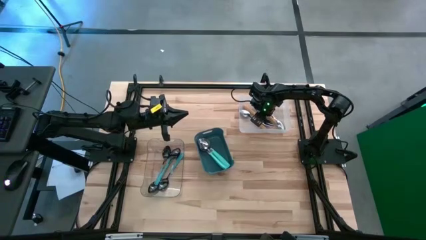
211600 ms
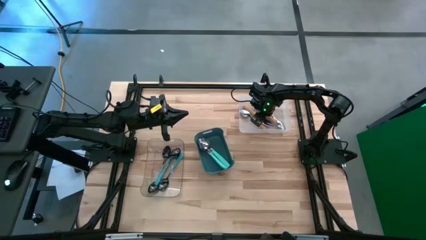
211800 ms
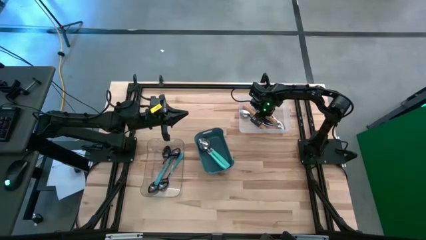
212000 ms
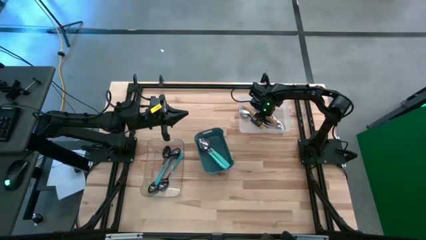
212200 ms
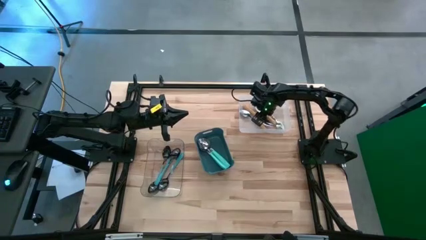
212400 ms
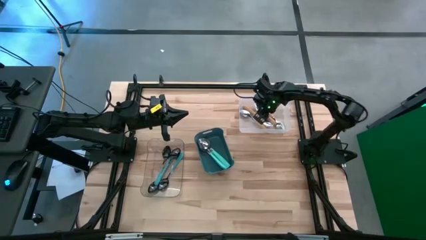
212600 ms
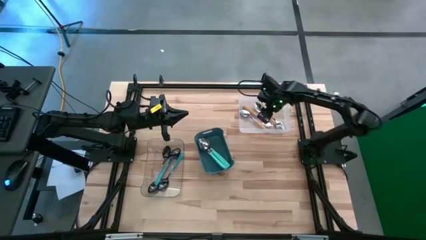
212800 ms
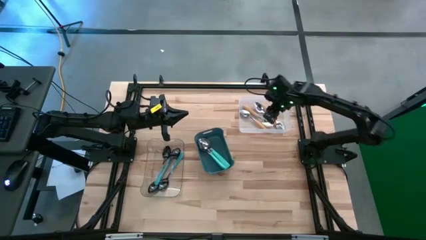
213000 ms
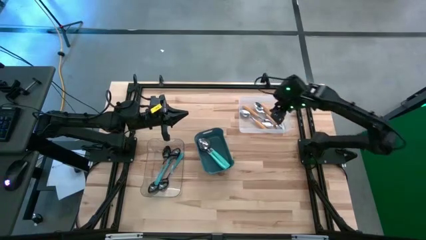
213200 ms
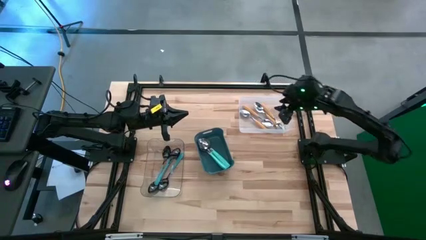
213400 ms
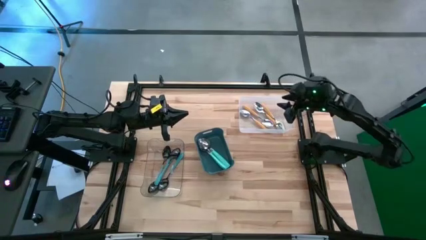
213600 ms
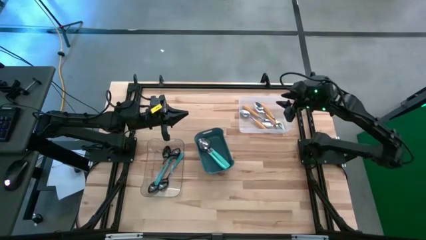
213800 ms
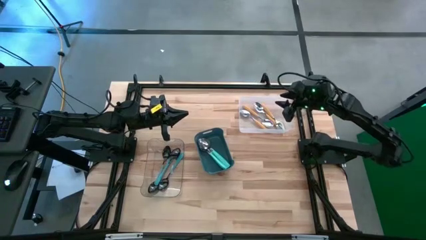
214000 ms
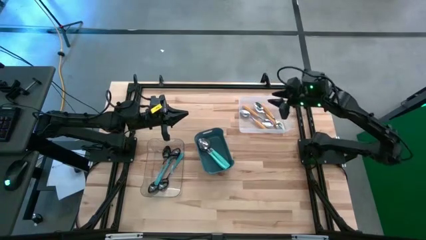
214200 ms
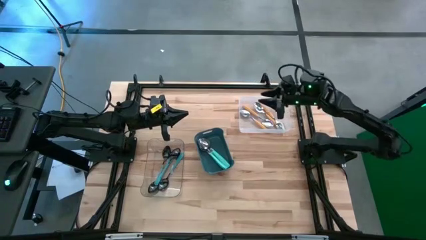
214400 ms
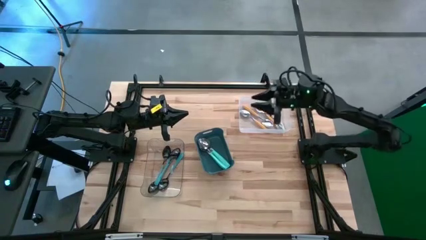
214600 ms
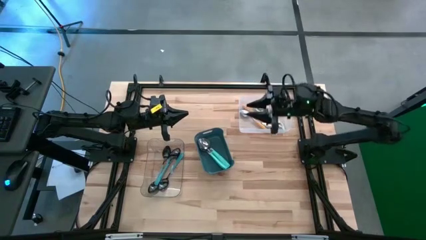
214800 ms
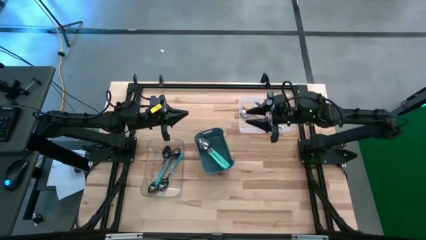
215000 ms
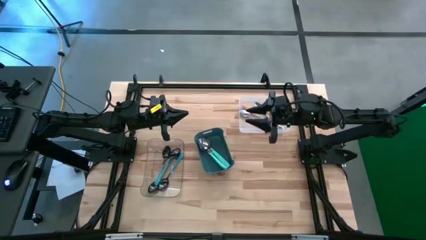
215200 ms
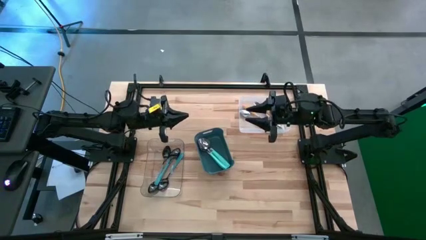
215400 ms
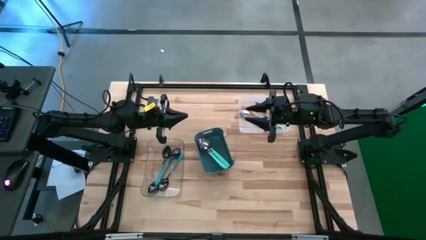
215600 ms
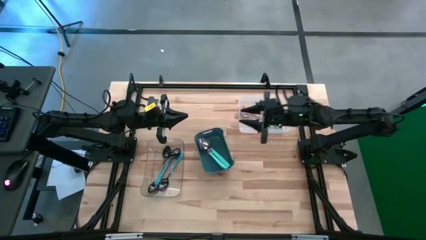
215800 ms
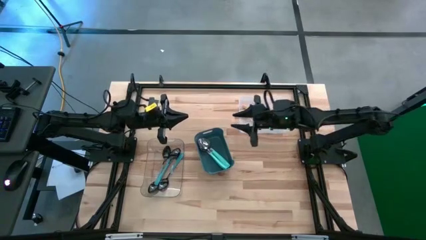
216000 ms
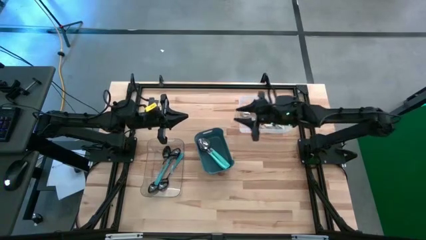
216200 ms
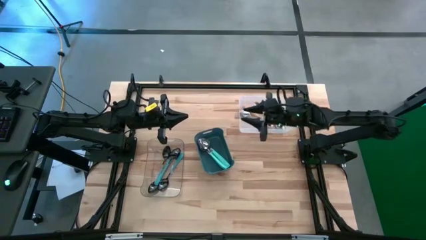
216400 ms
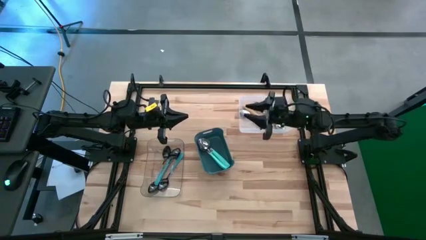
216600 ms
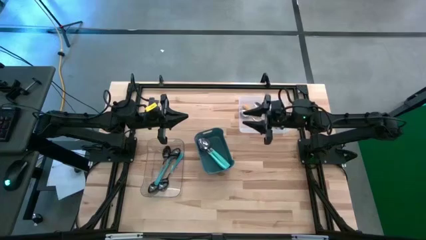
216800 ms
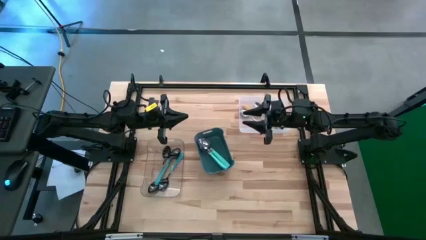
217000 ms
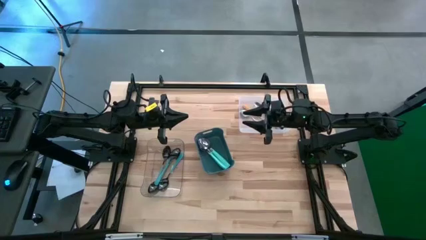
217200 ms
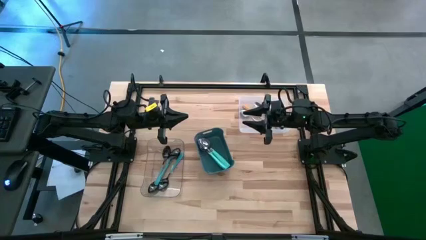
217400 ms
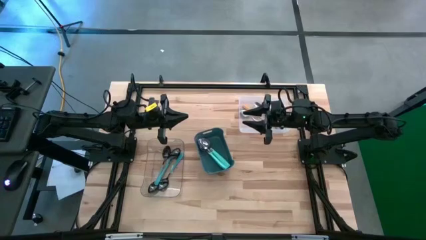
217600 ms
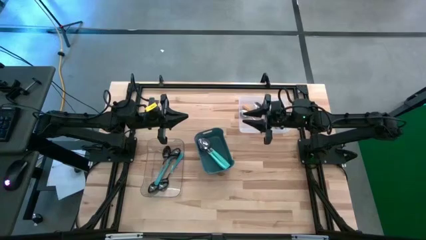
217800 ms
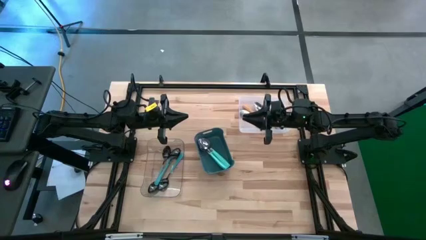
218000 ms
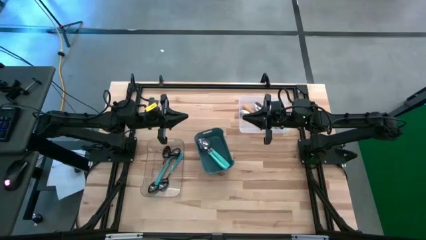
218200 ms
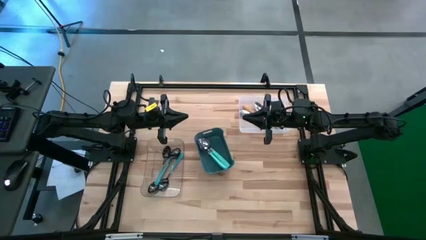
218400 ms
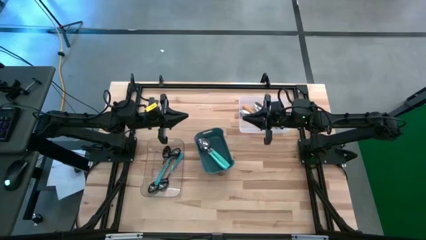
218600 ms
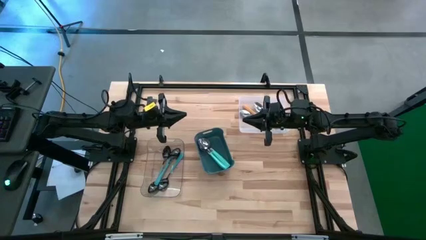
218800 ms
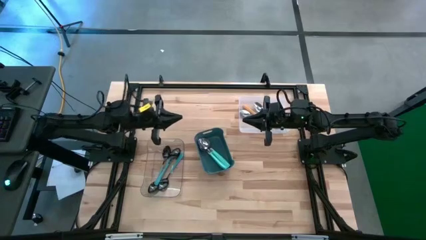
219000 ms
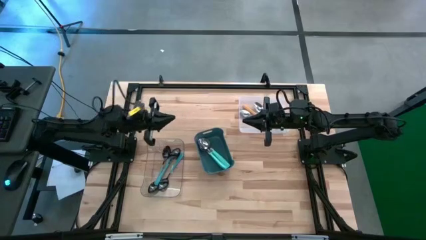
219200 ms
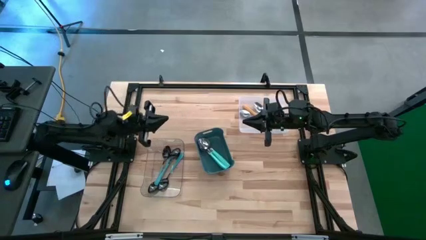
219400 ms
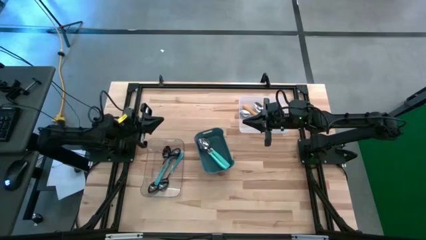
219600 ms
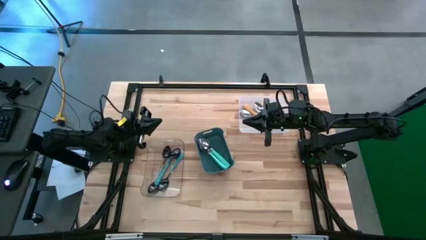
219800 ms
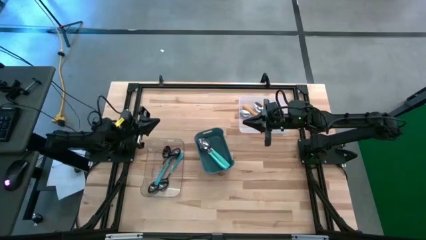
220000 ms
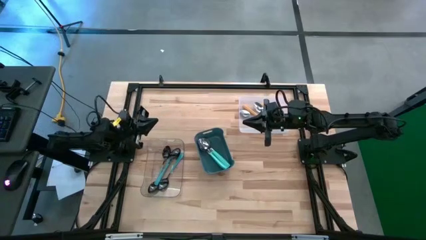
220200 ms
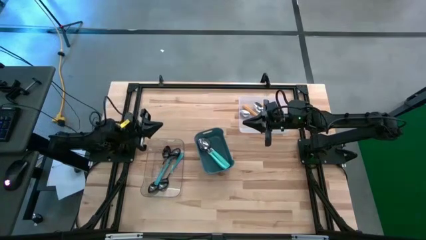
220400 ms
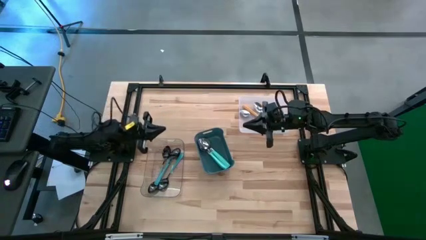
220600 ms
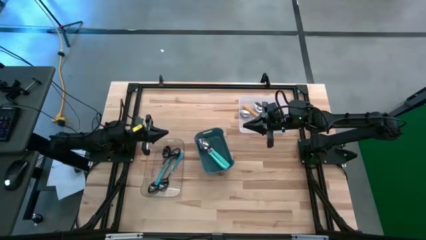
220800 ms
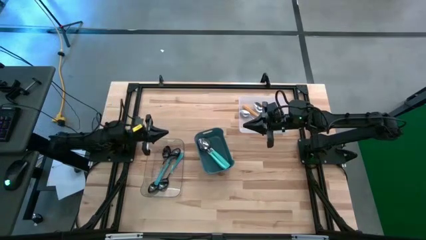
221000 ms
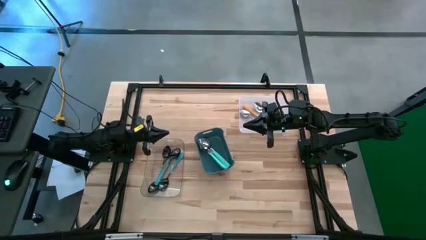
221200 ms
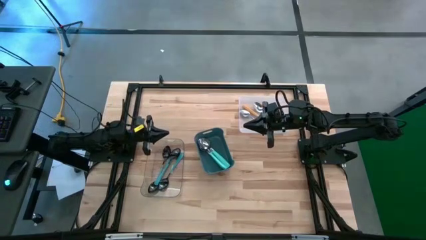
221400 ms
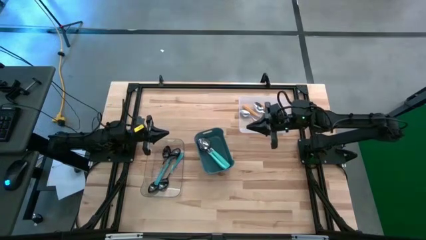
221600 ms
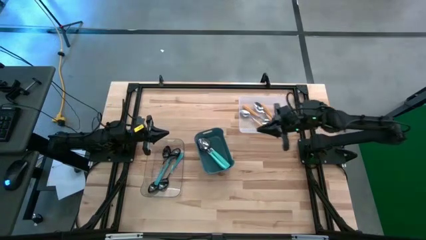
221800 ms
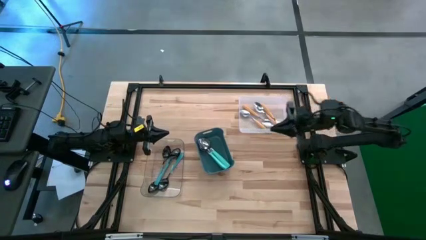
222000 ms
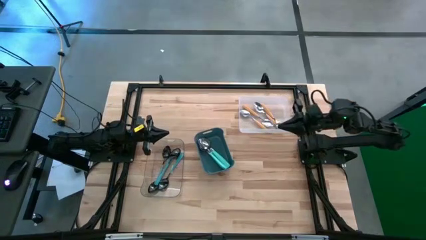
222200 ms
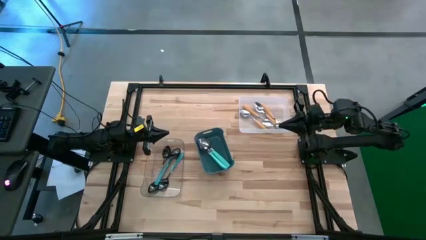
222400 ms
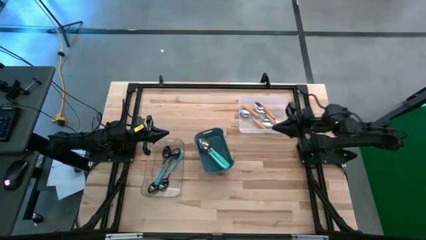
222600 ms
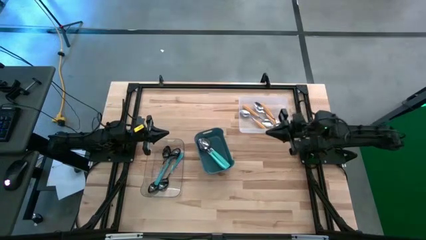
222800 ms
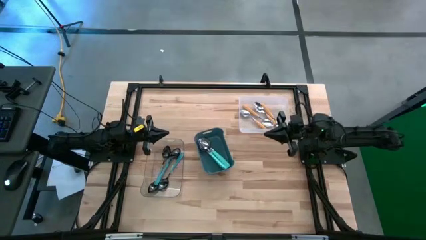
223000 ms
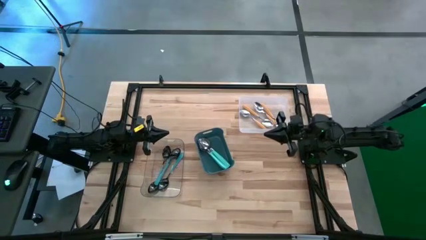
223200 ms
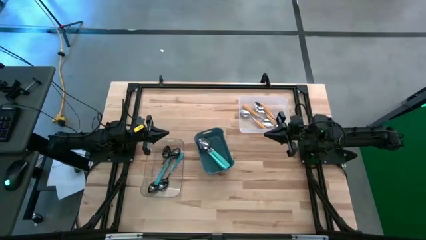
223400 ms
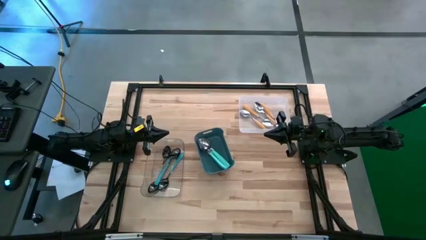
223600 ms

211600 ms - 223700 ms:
Task: Sort silverware by color (type)
Return to Home Position

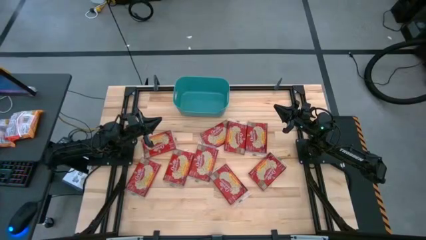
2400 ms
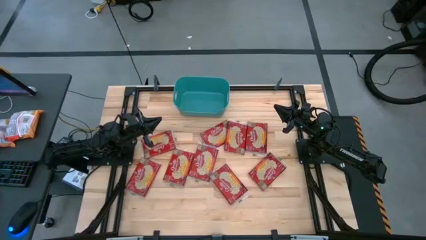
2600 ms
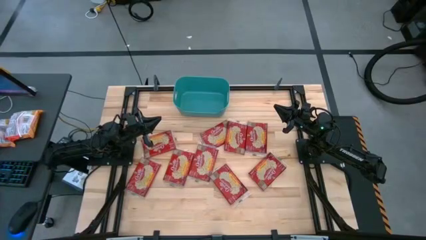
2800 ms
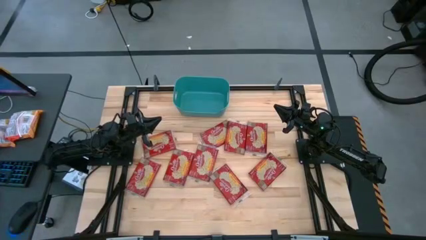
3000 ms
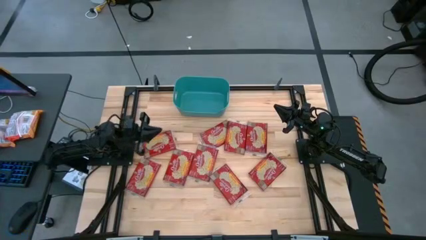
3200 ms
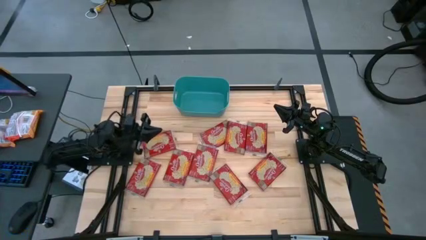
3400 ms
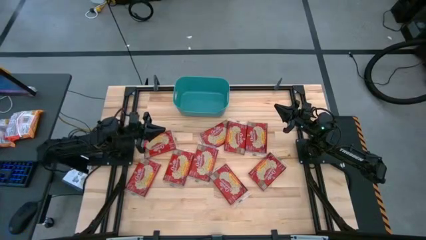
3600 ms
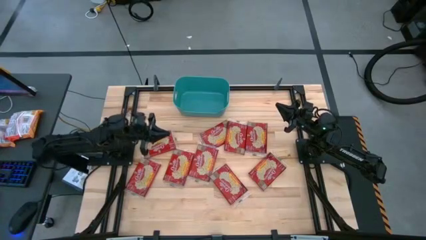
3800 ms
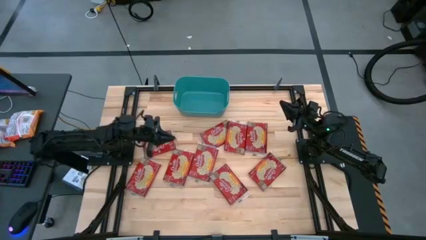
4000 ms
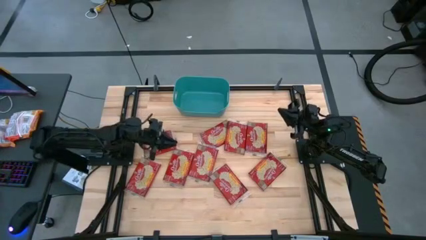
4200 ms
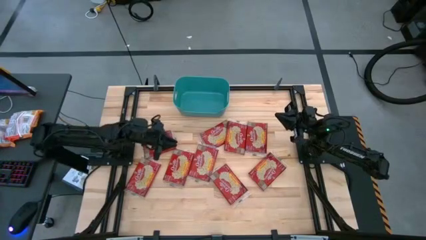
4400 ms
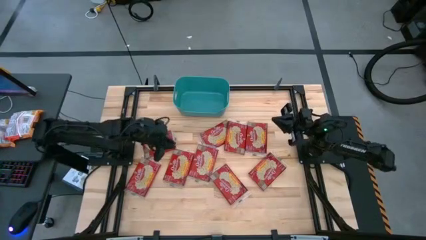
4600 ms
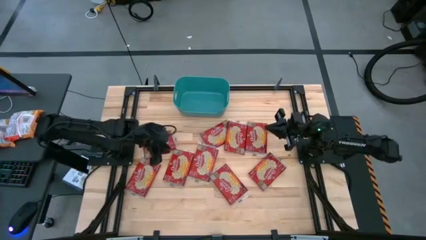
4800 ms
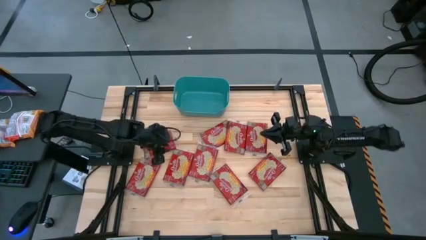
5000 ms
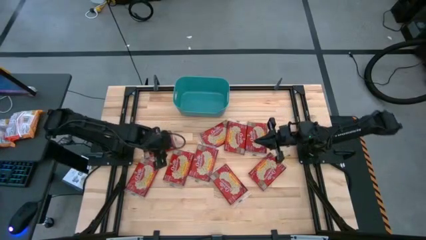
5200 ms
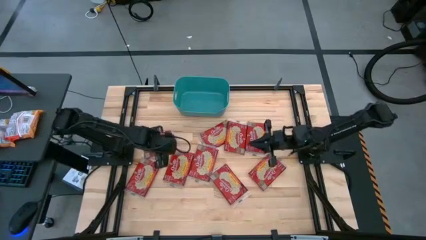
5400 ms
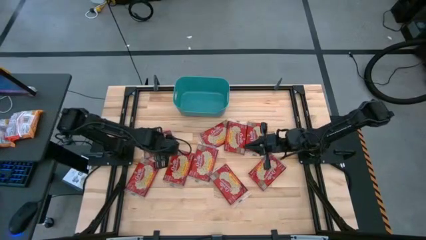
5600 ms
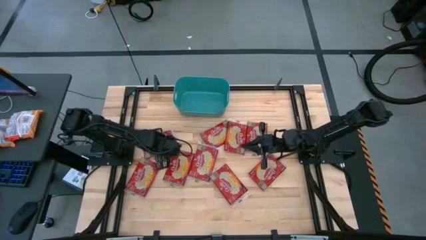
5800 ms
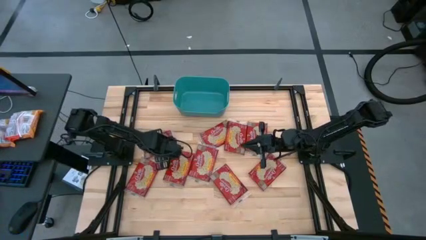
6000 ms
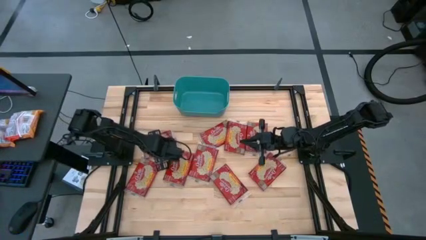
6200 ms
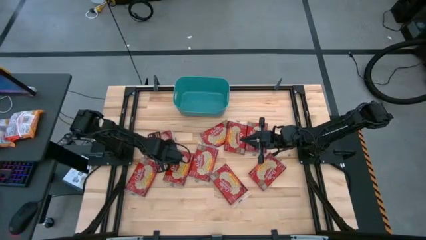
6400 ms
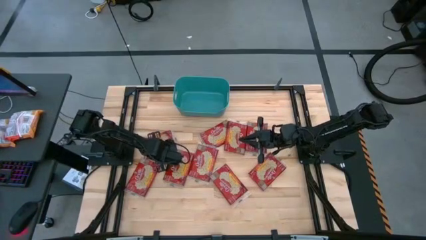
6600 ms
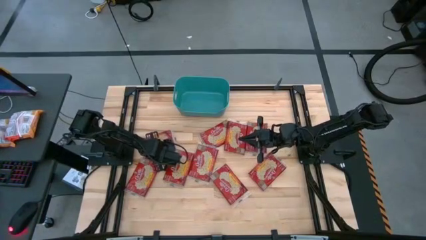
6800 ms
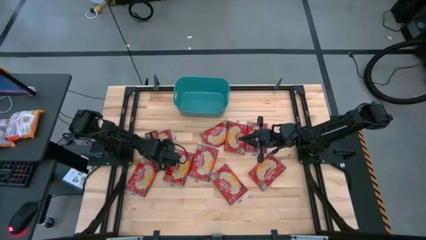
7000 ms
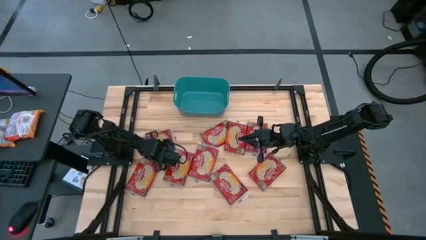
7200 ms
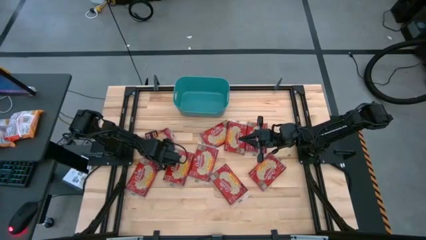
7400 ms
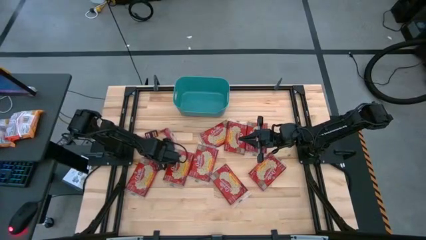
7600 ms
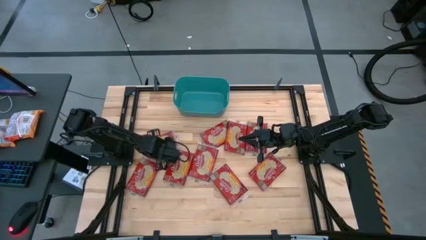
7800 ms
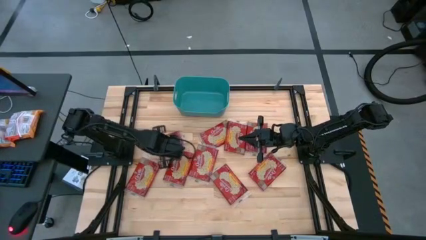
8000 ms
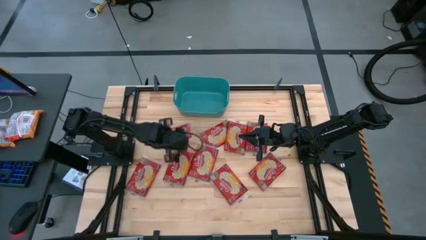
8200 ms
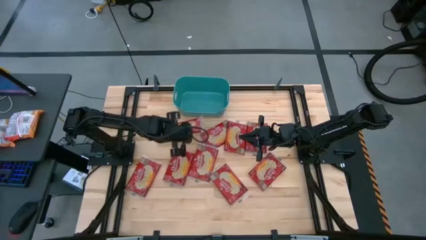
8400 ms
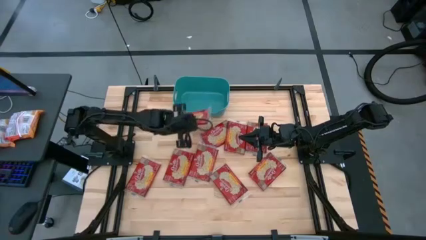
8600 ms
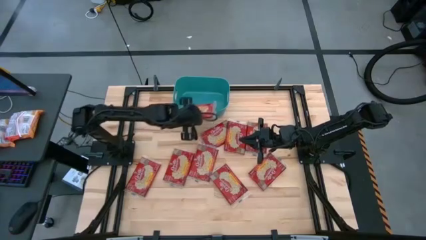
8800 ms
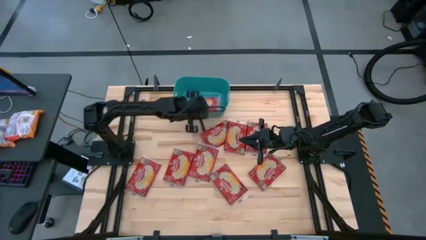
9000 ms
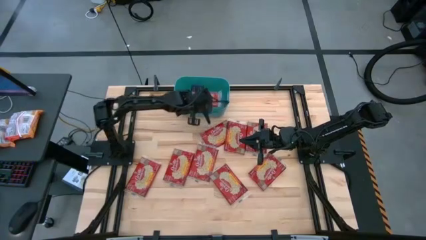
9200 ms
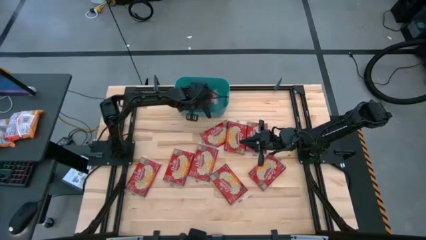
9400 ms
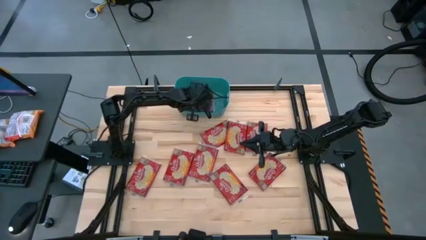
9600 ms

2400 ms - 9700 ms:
Task: Sort popcorn bags into baskets
Put the popcorn bag into the green bin
